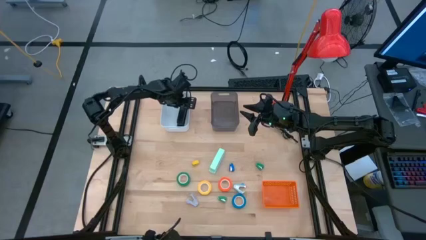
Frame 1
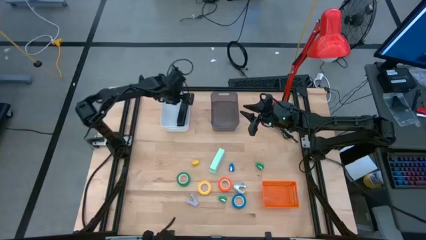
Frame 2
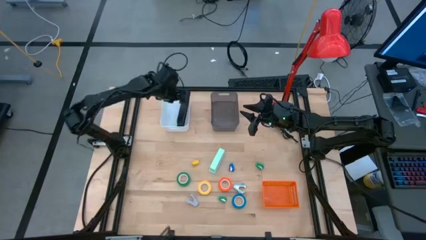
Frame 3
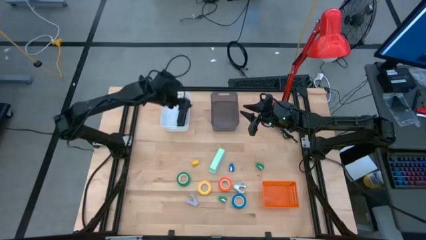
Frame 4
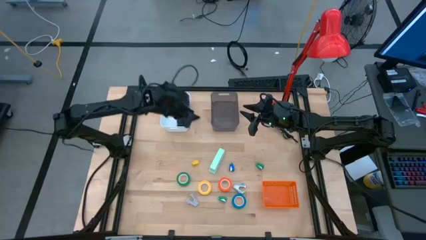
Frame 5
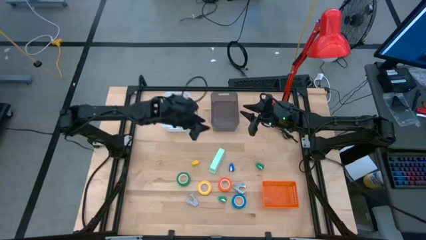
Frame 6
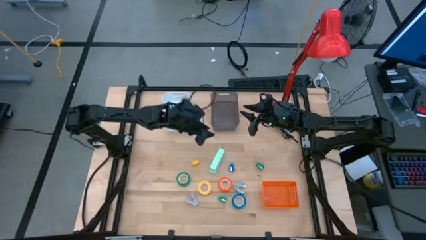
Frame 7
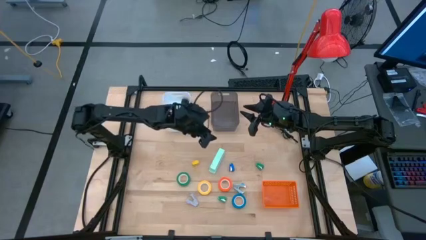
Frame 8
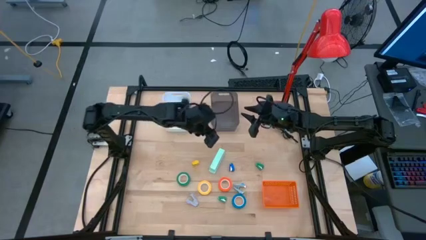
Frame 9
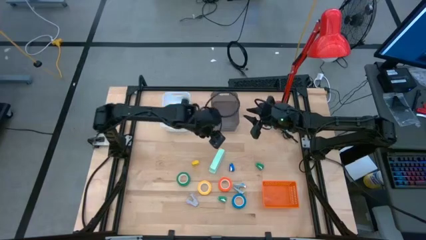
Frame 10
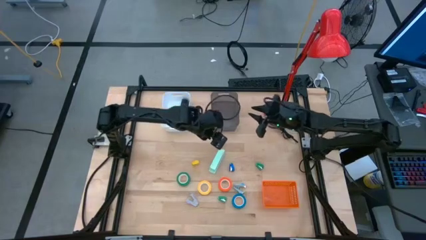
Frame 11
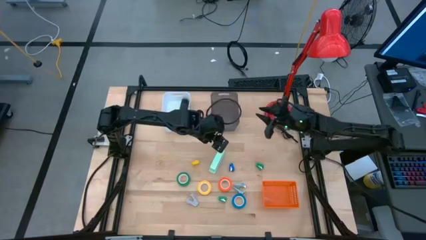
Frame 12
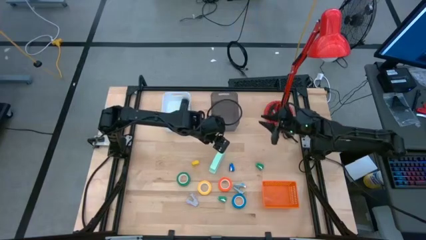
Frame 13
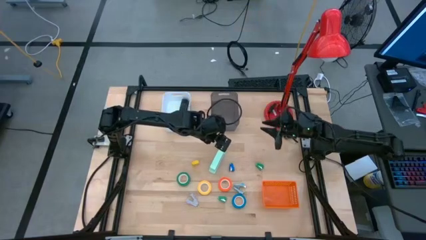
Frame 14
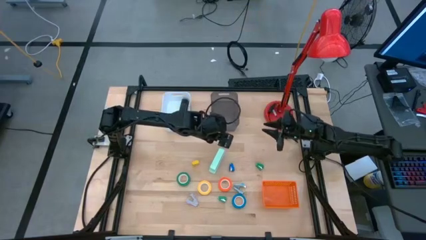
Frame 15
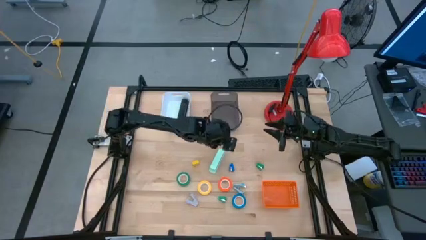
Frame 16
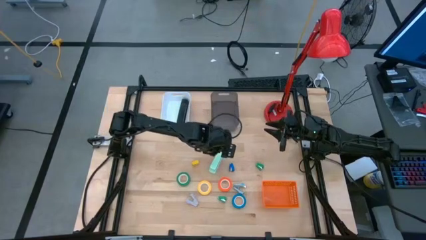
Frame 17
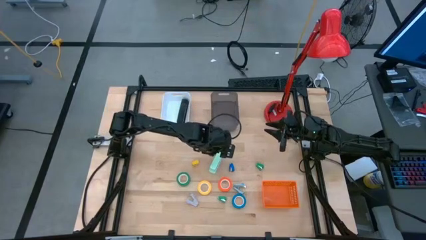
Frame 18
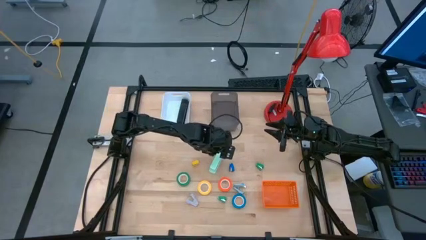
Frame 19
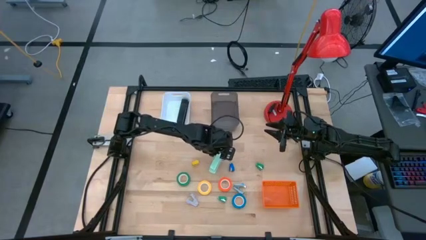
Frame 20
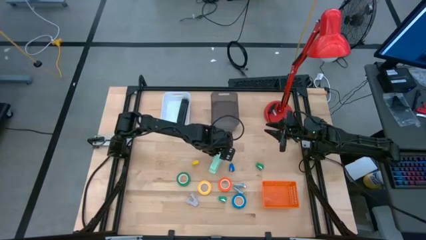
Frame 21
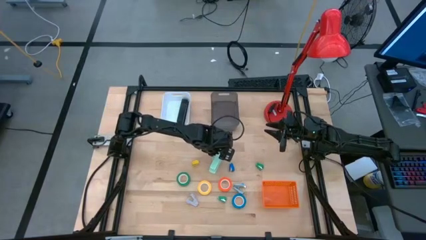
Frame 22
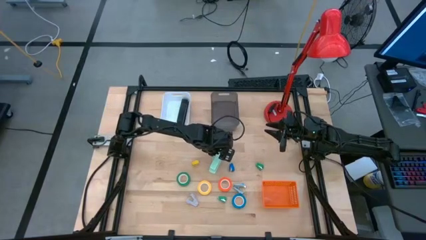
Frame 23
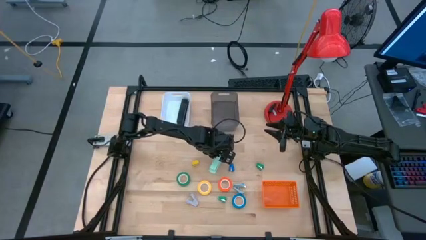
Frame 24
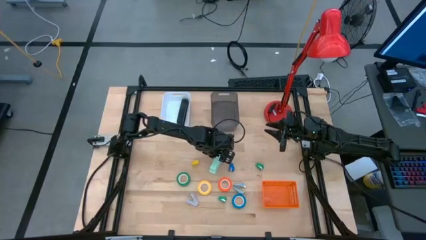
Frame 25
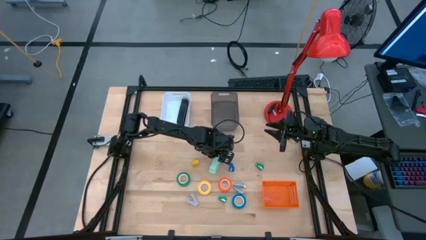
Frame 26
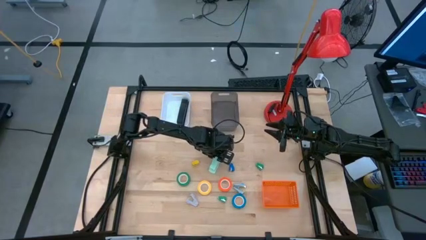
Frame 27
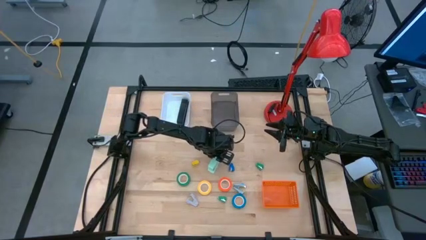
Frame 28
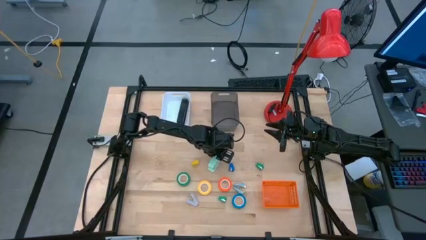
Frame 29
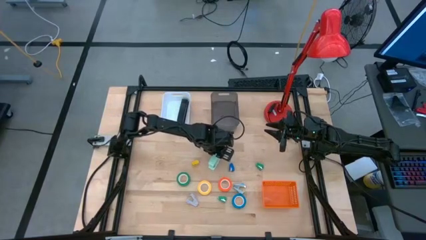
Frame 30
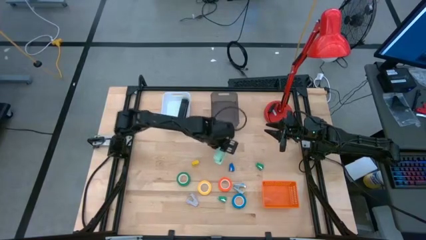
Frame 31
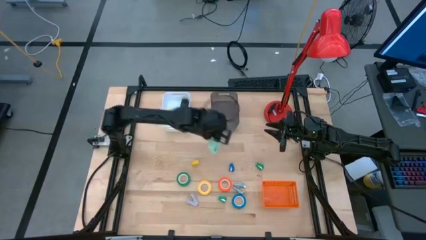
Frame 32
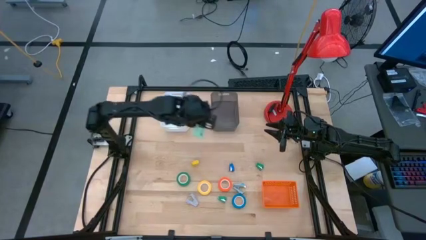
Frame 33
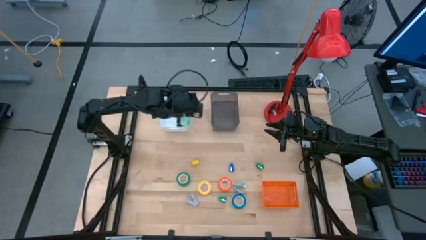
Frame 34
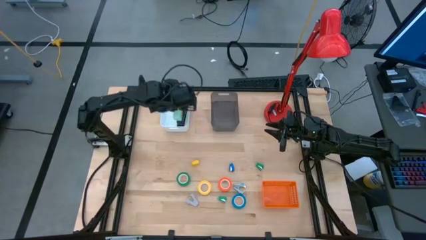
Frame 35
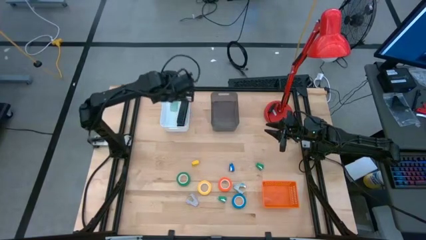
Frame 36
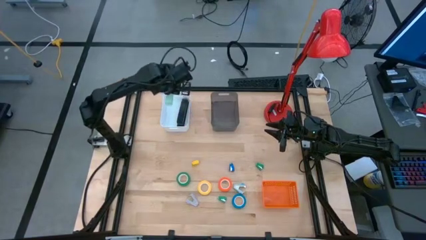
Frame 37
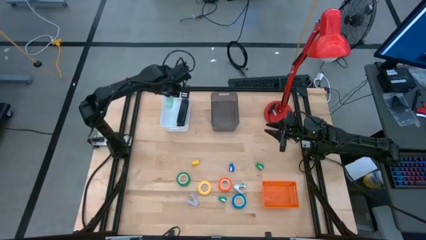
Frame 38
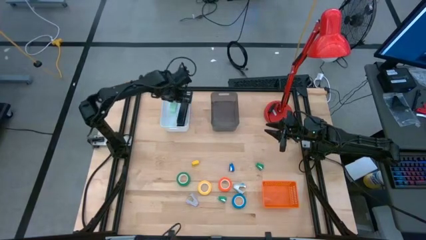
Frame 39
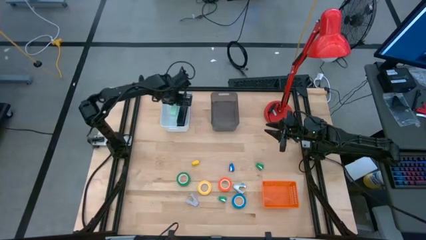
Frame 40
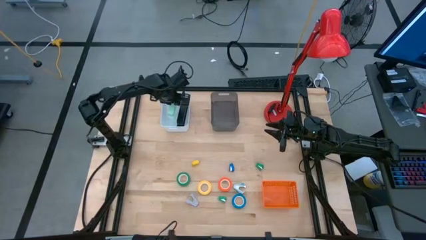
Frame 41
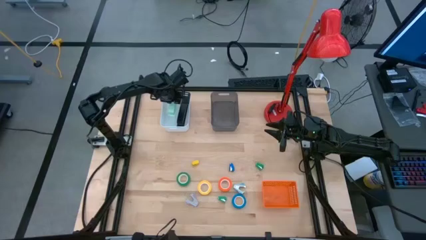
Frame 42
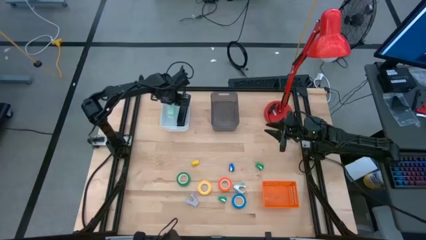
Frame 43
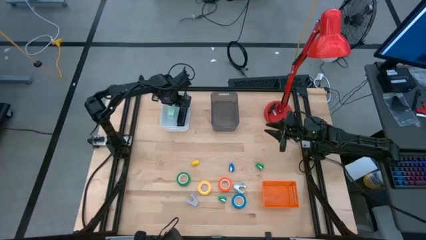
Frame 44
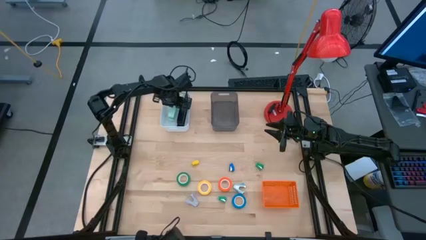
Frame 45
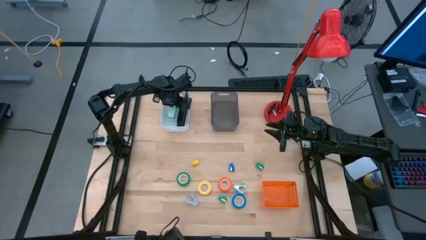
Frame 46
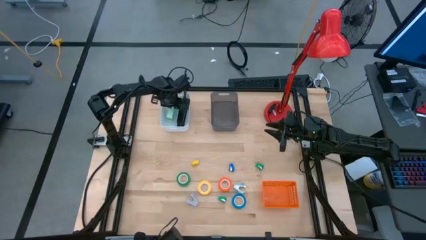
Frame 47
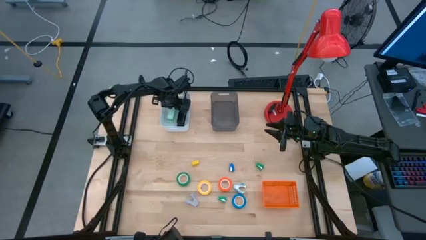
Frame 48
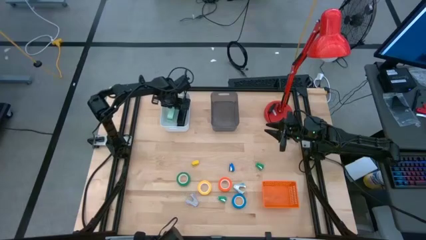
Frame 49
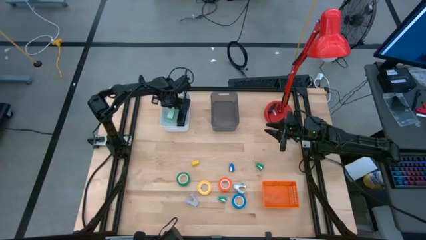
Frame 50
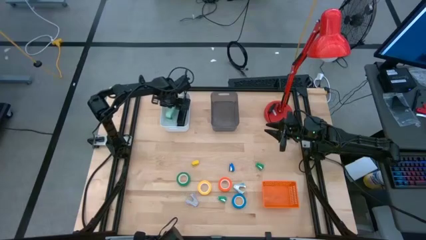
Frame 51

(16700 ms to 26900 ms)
Task: Pick and place Stapler, Stapler remover, tape
Put the large light blue stapler into the white bin
